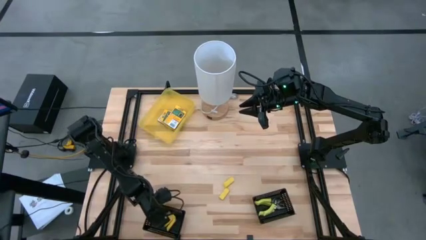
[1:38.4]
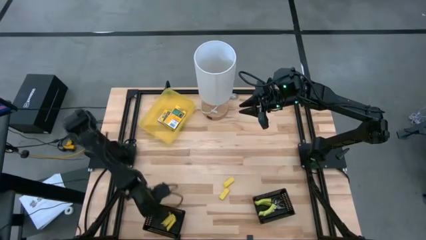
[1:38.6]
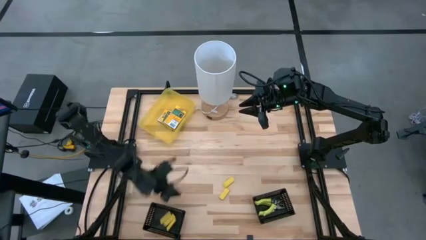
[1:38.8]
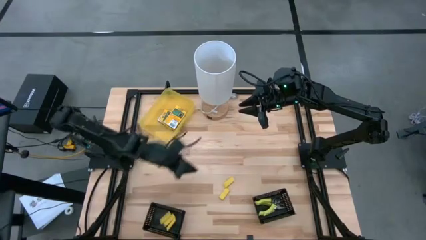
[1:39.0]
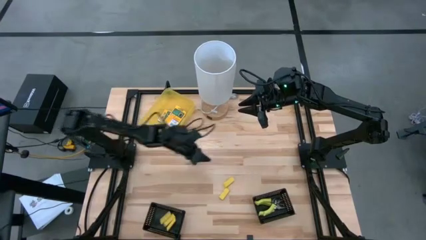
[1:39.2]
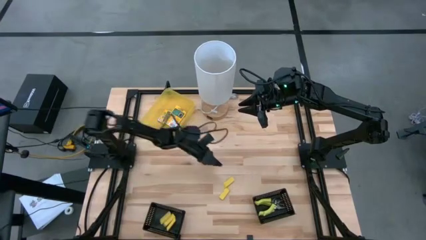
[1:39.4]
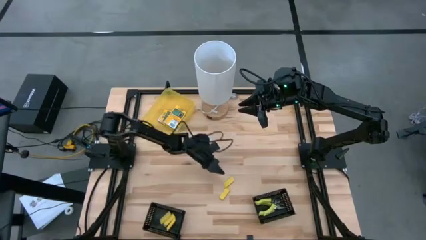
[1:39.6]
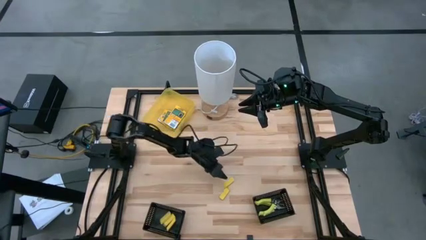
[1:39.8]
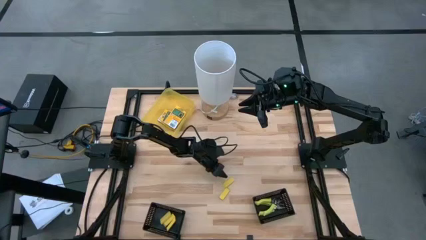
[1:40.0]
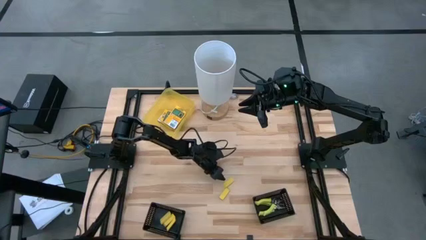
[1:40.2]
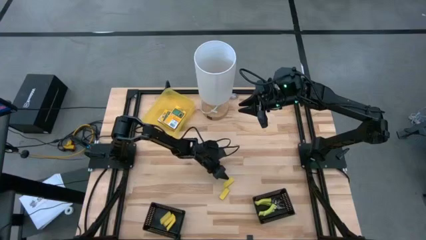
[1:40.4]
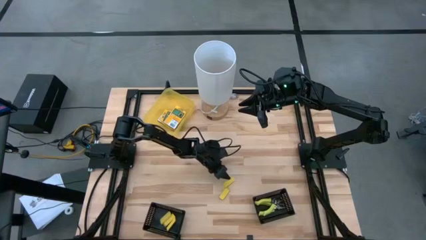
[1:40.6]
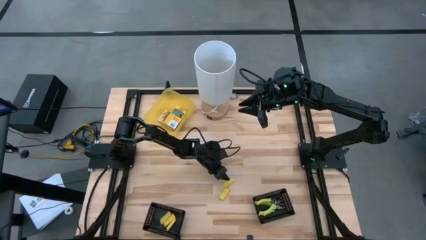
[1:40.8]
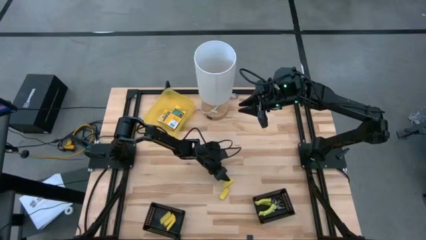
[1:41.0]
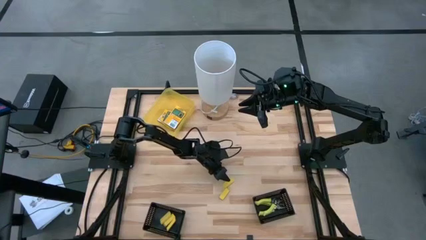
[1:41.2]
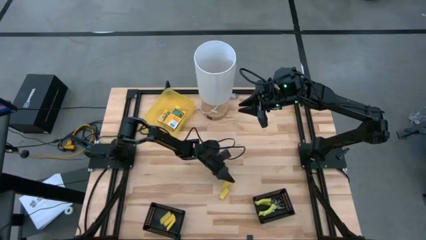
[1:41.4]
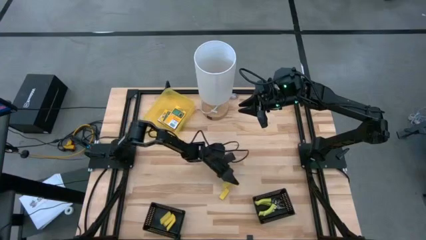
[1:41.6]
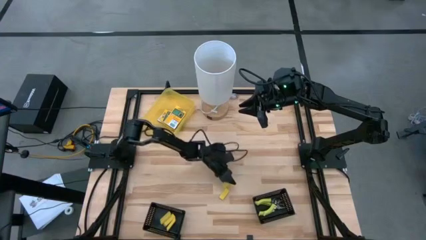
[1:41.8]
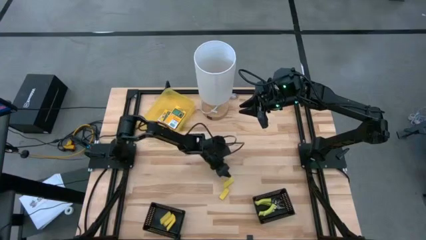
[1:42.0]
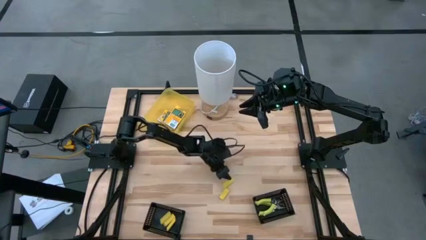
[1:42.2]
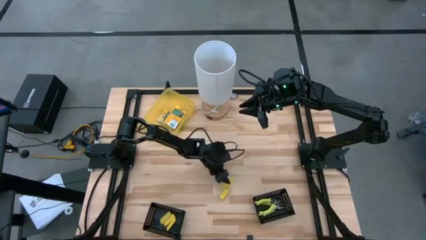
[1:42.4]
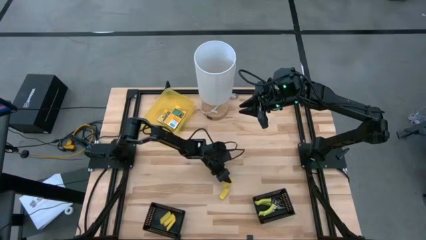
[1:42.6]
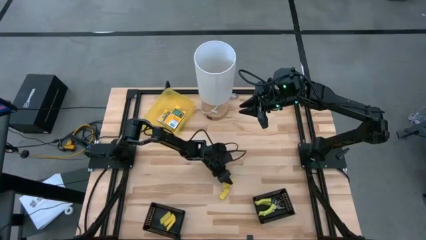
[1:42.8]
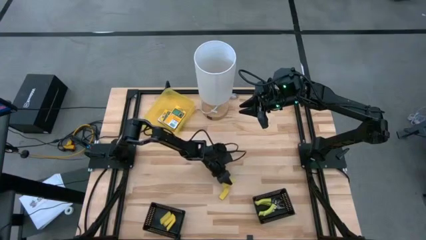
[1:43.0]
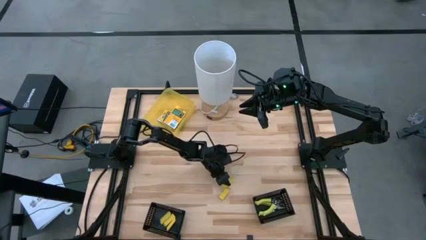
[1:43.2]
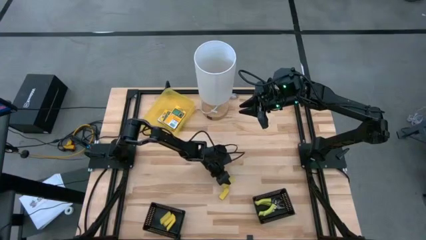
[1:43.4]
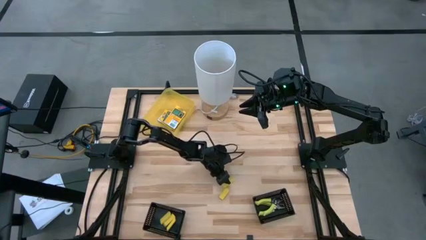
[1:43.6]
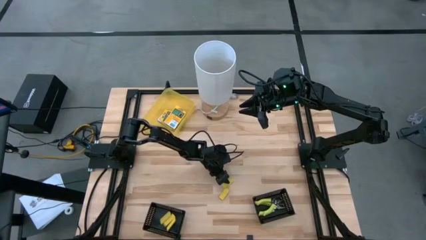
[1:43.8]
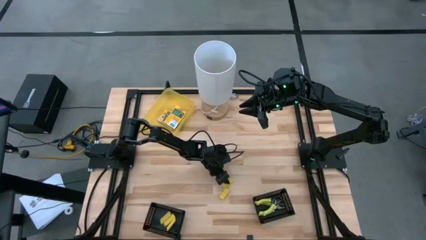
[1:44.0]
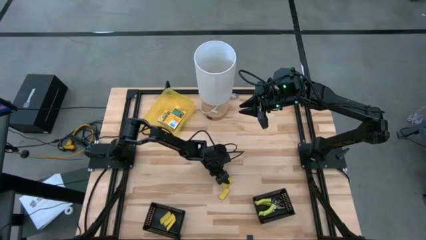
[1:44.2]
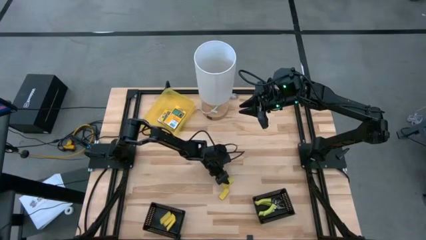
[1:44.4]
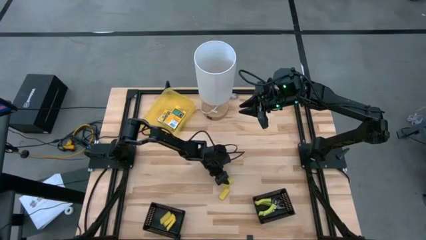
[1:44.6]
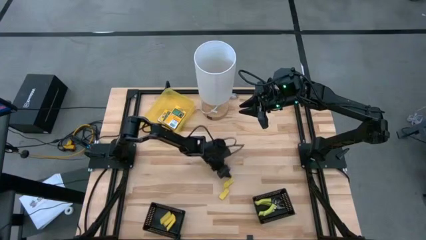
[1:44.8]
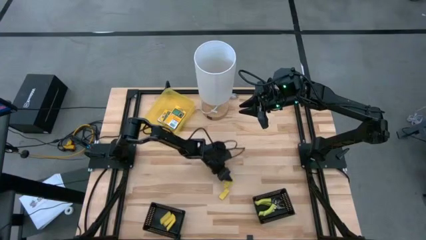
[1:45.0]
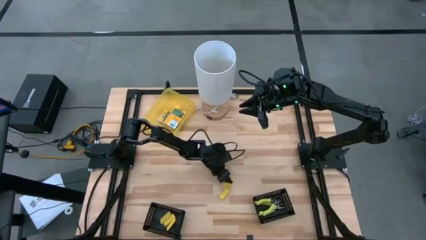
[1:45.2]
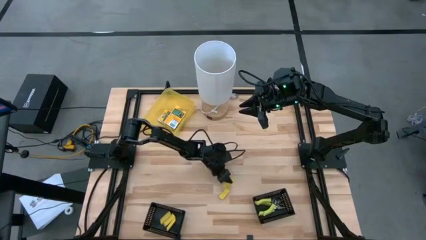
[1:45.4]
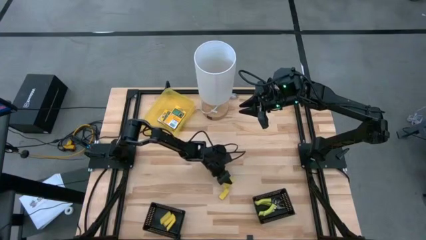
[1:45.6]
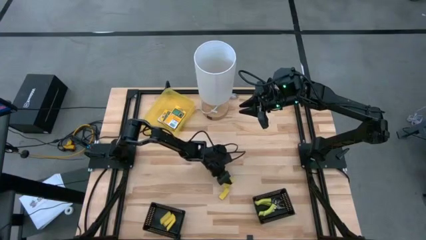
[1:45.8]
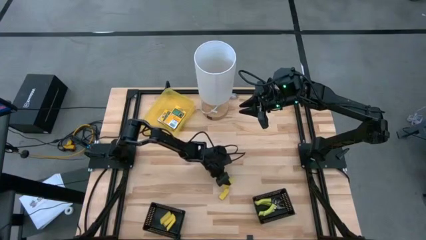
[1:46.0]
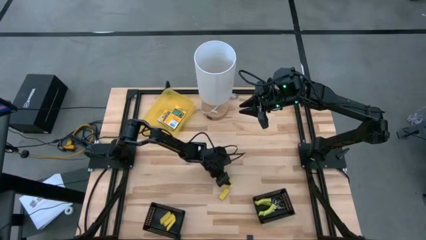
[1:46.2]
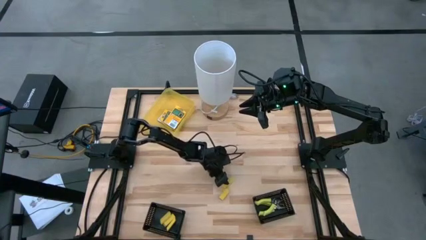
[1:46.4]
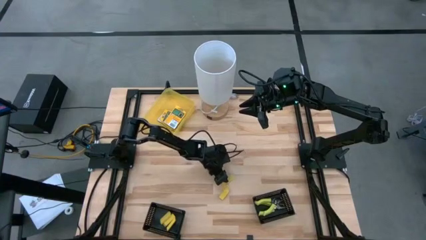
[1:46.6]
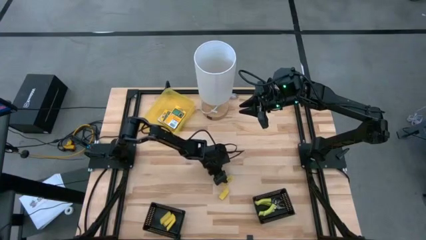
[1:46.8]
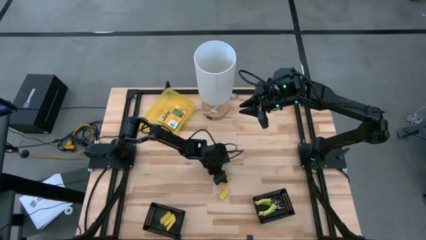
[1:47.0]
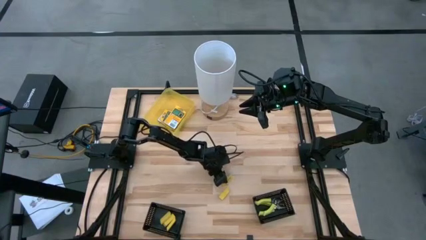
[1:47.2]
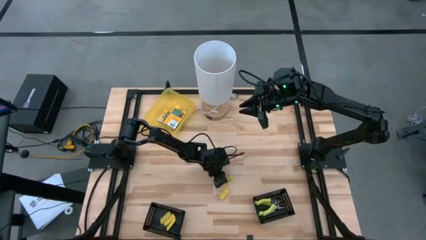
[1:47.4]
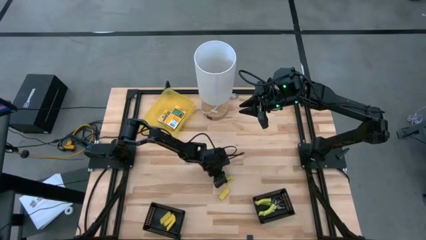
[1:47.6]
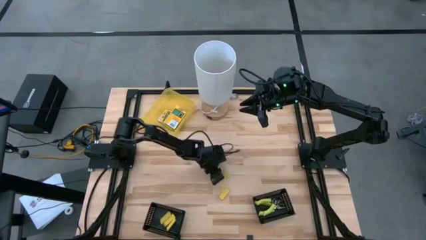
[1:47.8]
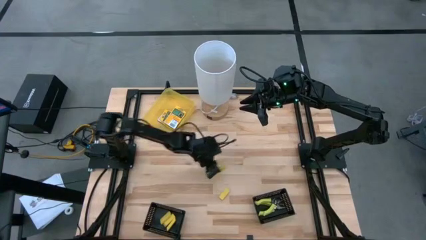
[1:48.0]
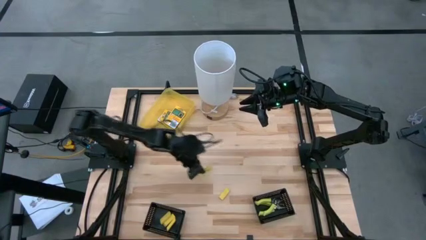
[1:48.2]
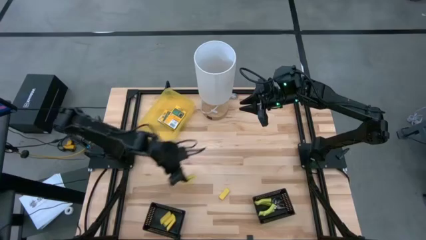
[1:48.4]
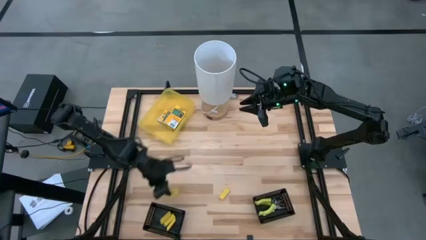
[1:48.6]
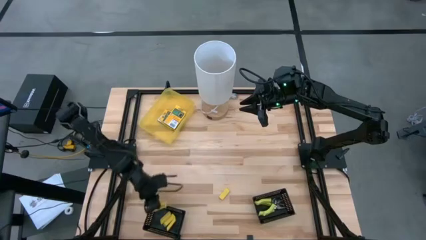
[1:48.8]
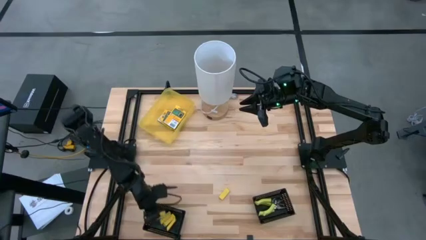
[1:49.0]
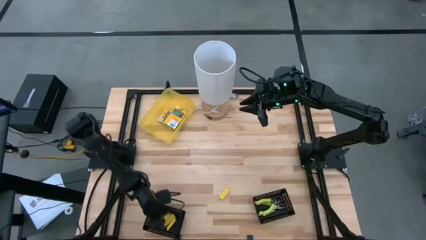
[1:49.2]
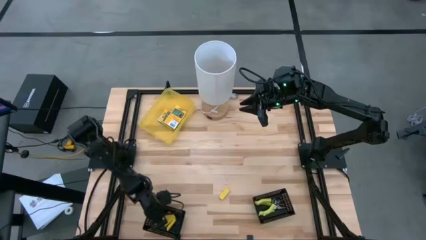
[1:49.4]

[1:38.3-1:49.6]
Task: Pick & Place School Supplies
Put the eraser into the bottom left black bin

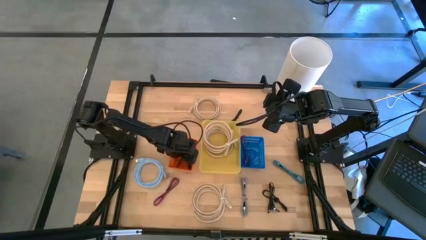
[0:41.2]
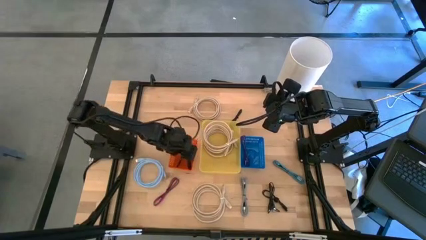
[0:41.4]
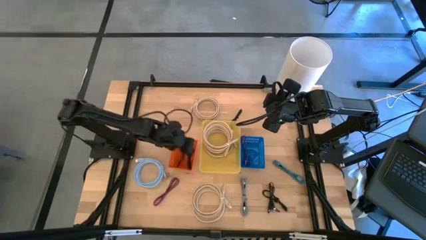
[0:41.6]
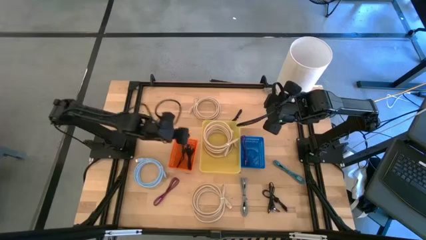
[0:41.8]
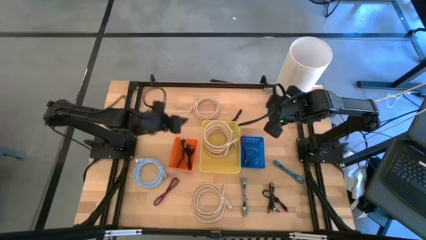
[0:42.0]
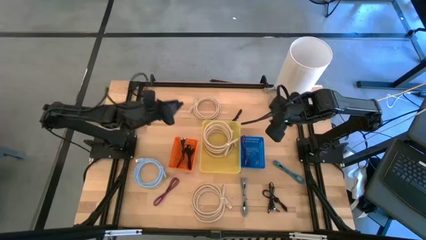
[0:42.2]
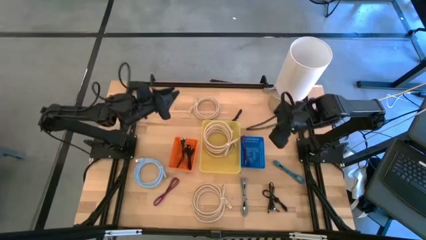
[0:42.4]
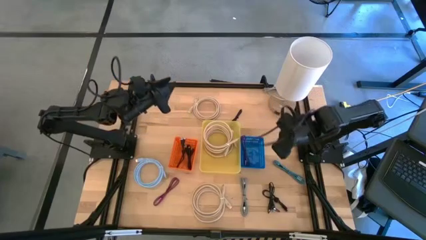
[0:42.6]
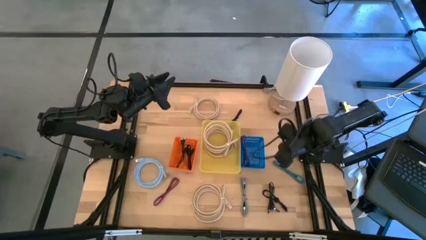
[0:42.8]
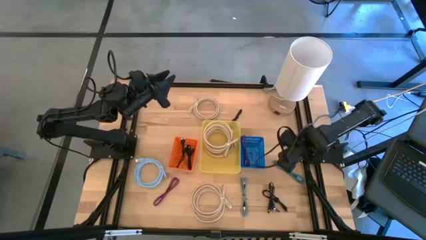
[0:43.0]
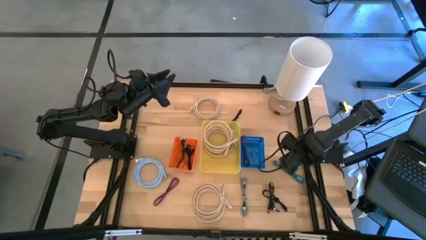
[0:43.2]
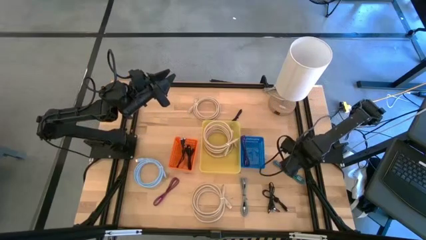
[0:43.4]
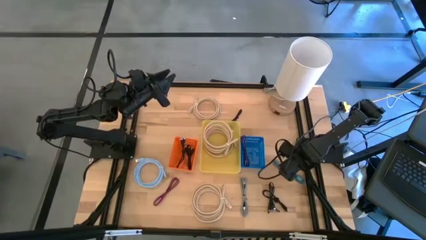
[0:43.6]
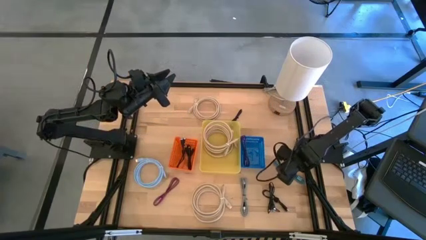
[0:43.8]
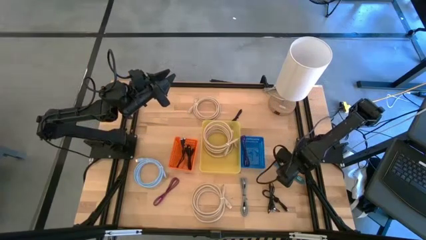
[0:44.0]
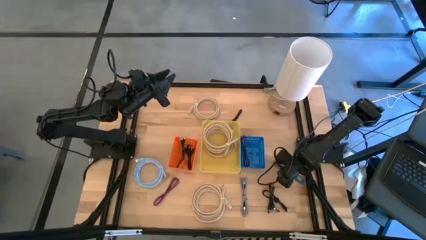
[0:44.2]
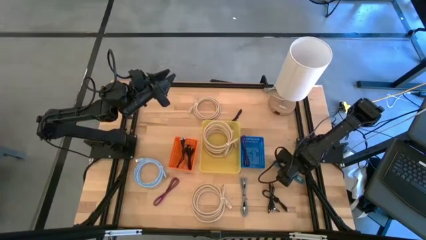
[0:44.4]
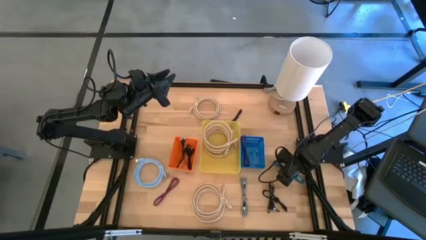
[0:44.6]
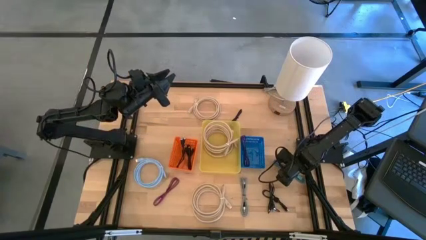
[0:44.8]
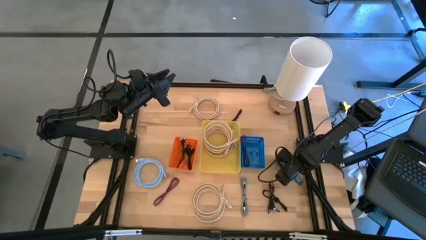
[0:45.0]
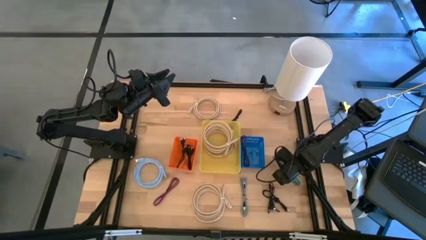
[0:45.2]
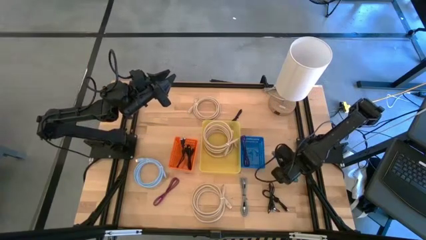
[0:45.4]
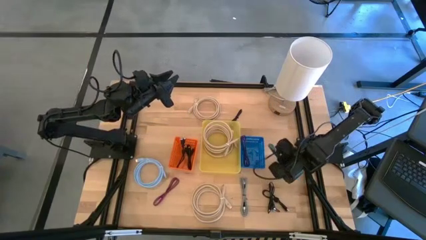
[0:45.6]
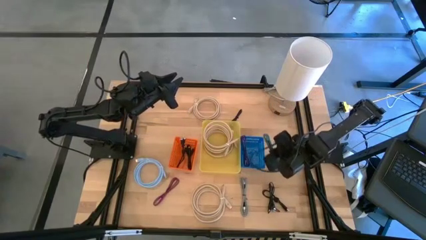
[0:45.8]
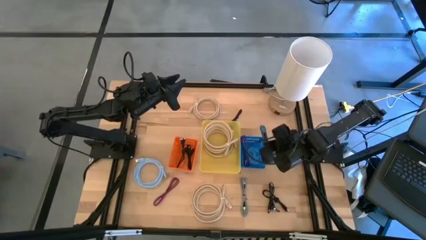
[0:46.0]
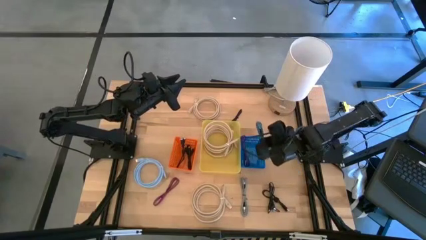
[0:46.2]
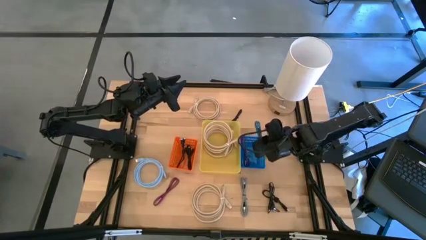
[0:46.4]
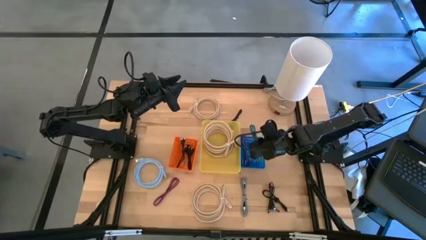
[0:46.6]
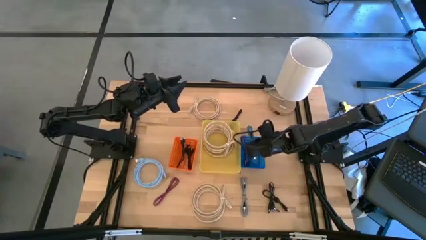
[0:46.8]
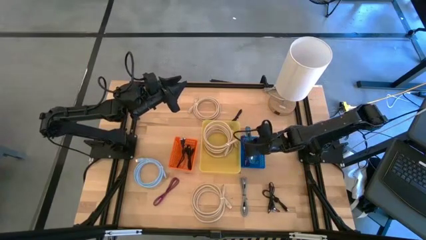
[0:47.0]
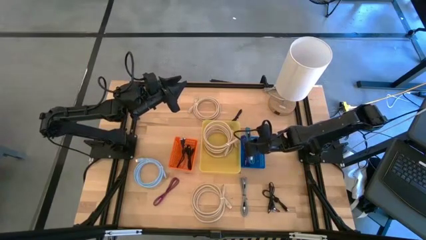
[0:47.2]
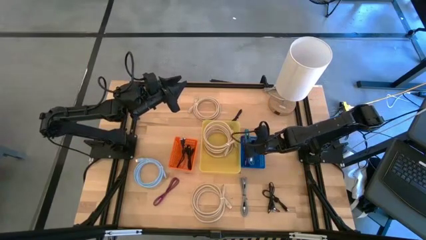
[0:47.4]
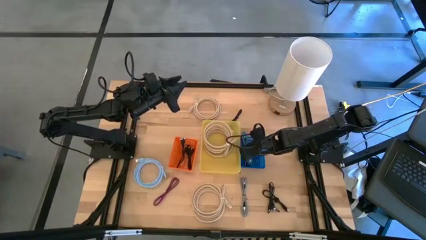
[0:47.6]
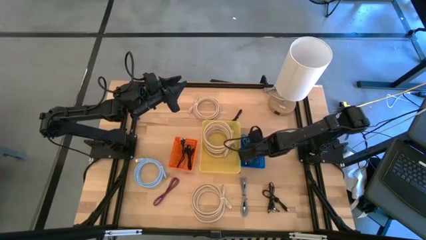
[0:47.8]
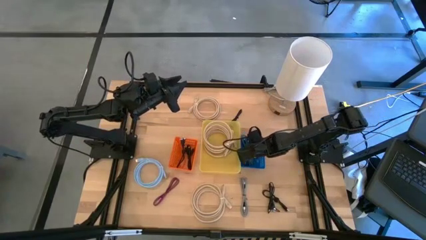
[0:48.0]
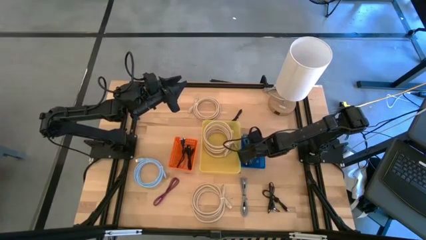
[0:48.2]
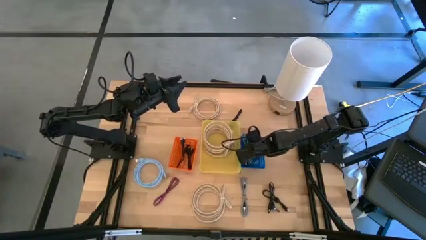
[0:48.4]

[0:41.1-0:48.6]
Task: Pick & Place USB Port
Put the blue patterned usb cable into the blue bin
